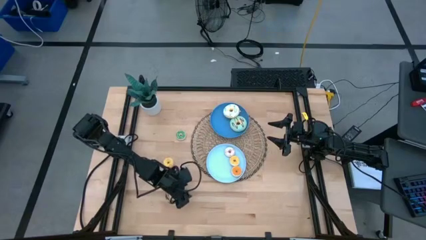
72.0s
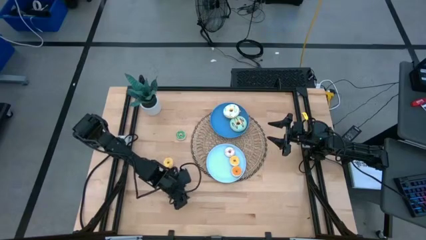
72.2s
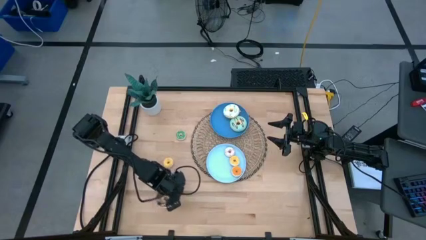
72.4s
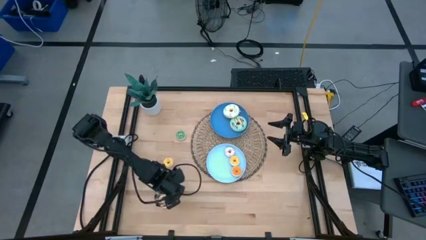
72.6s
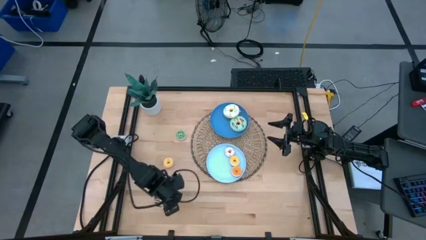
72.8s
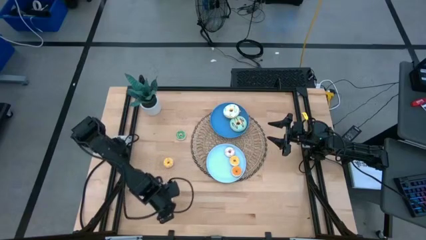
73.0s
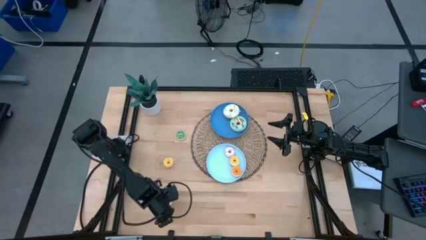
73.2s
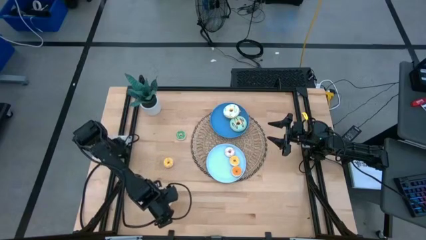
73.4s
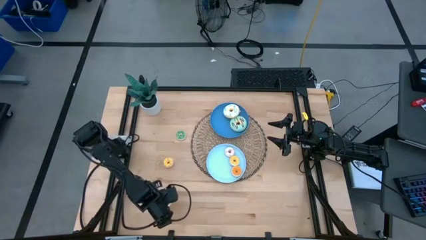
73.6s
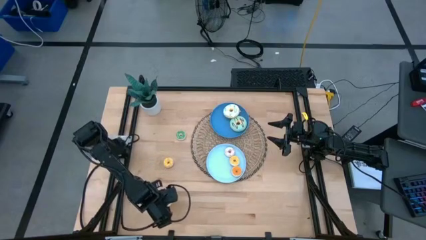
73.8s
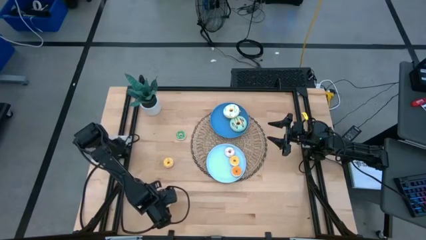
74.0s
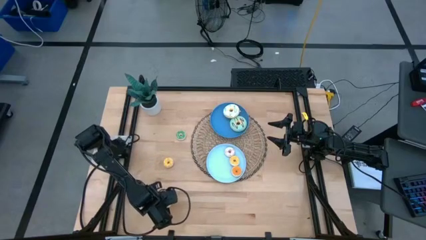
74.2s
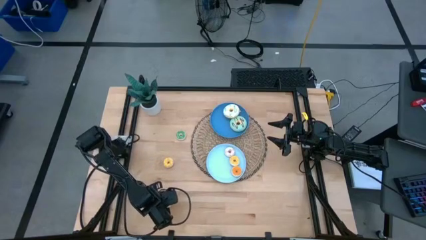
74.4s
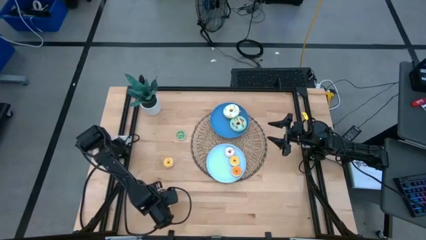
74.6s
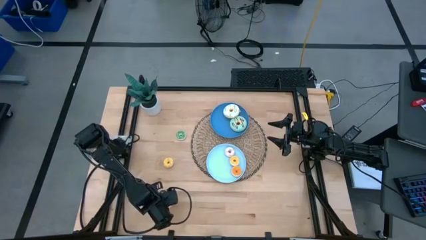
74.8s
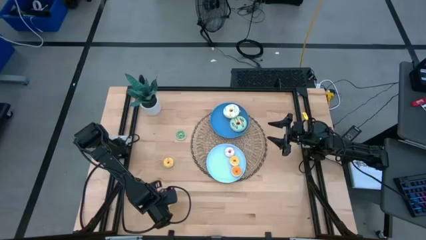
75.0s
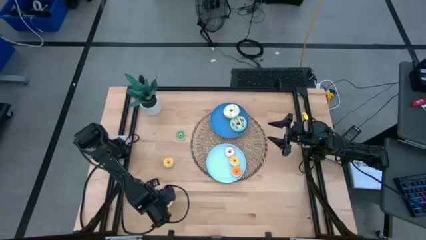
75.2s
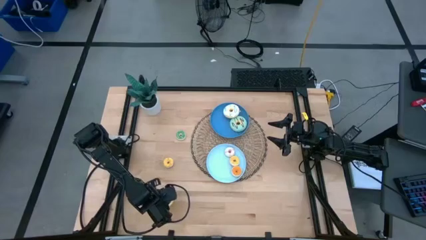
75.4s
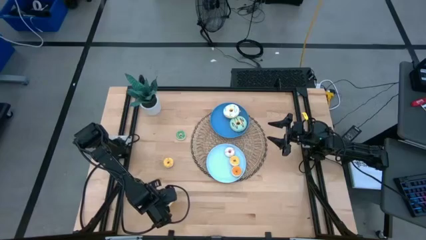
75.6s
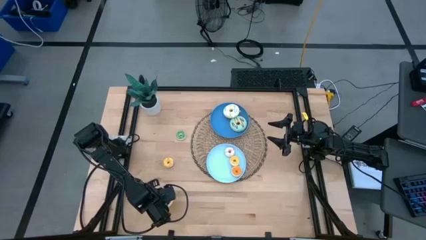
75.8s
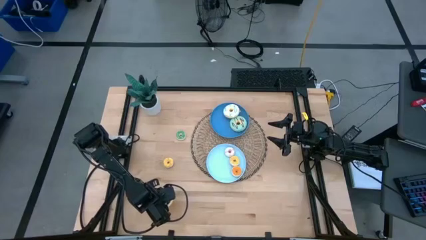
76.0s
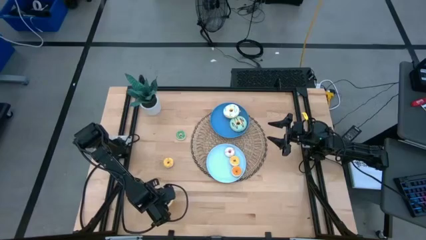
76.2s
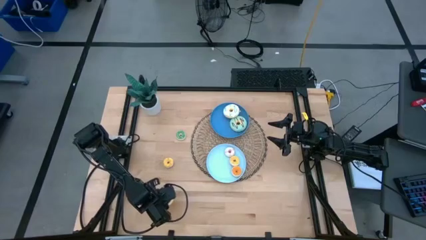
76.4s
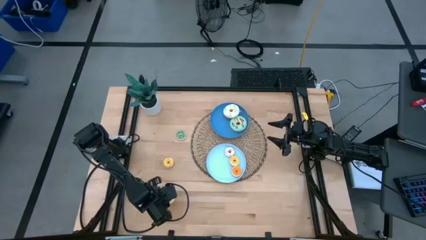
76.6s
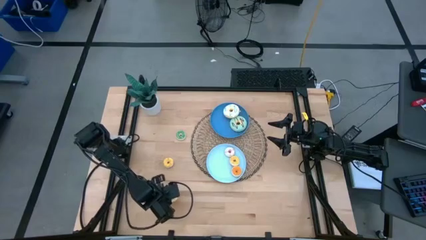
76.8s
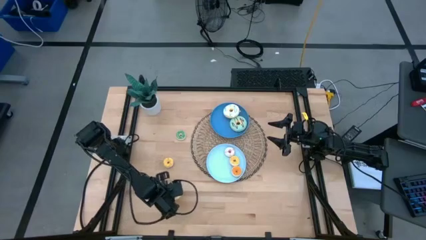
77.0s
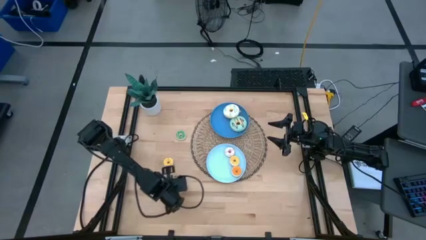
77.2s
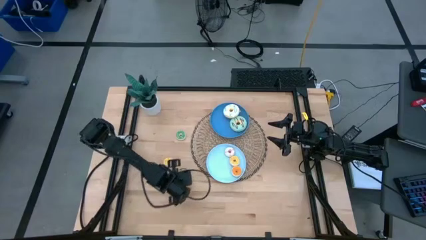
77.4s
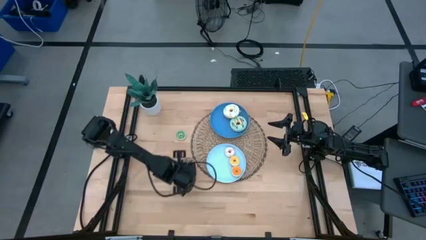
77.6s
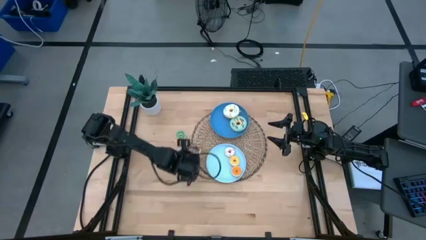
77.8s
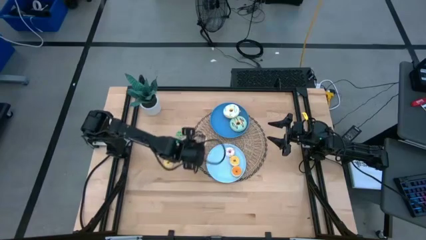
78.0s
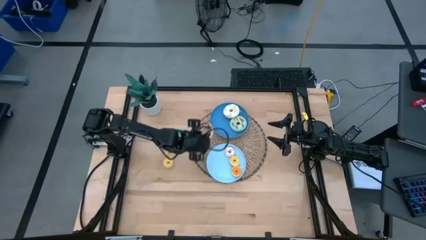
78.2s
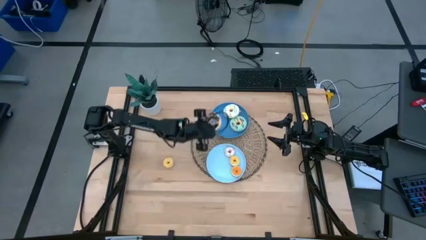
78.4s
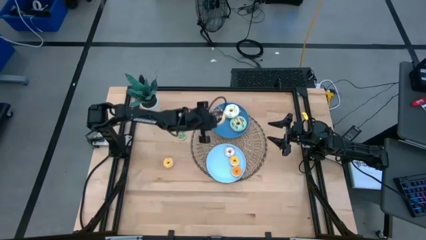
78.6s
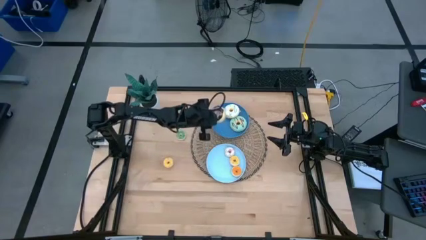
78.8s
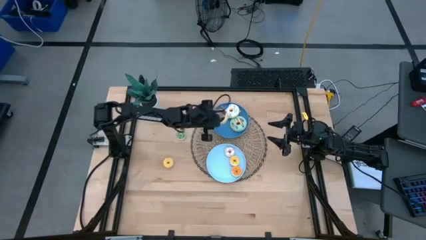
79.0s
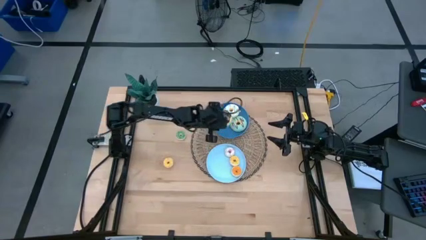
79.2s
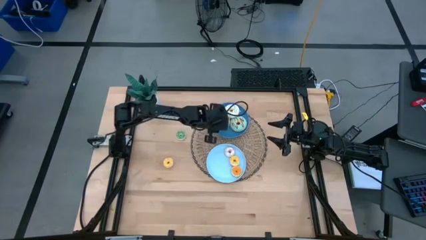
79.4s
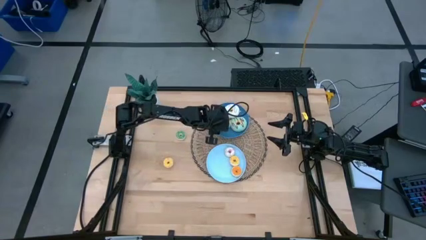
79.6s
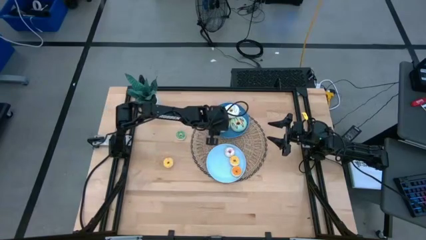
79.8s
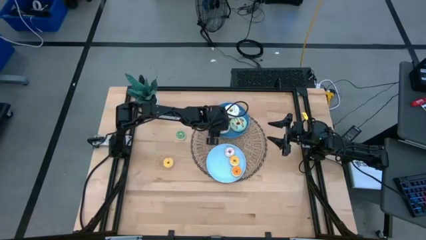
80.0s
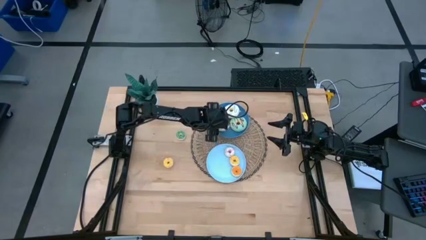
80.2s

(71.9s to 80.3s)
Task: Pick & Place donuts
Put the black donut on the blue plate

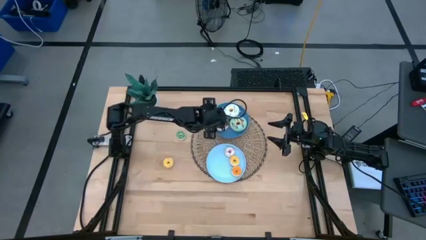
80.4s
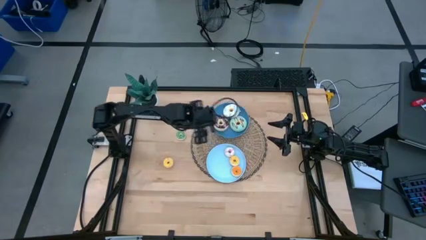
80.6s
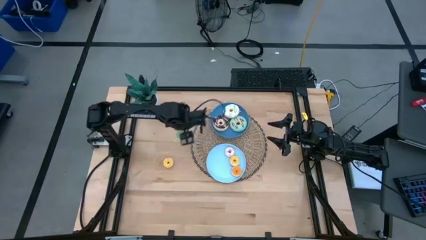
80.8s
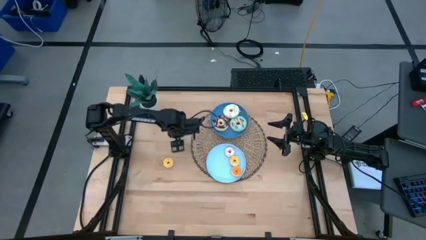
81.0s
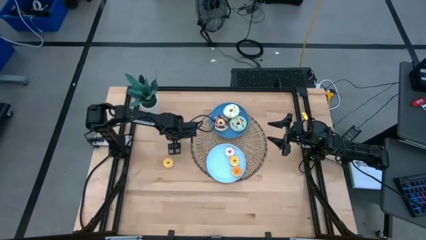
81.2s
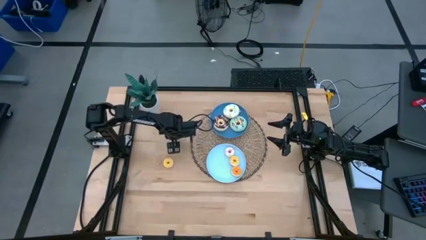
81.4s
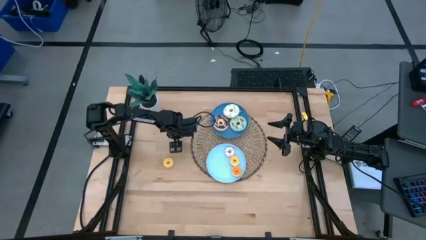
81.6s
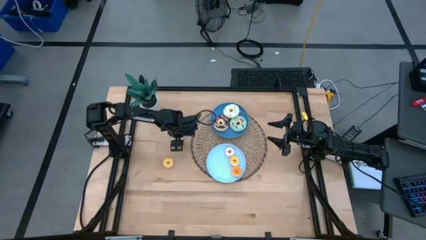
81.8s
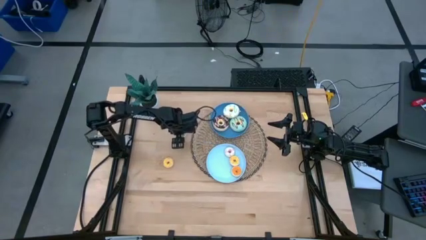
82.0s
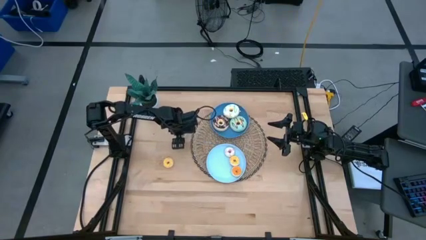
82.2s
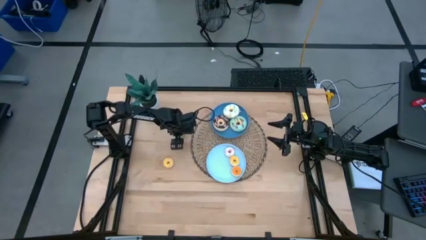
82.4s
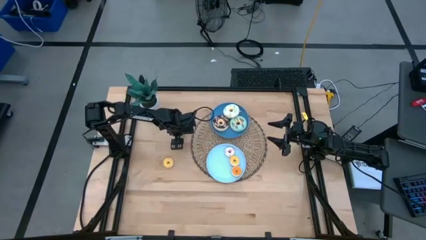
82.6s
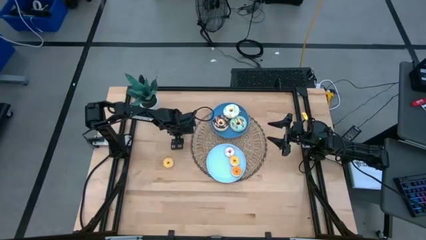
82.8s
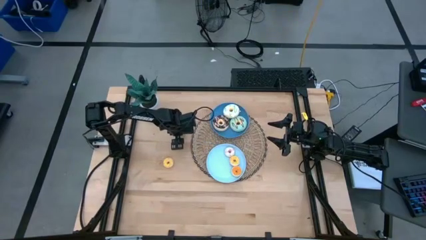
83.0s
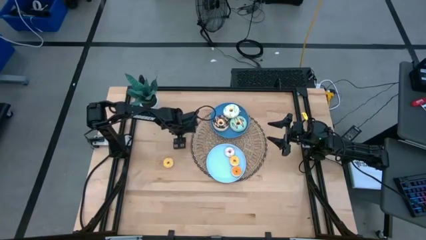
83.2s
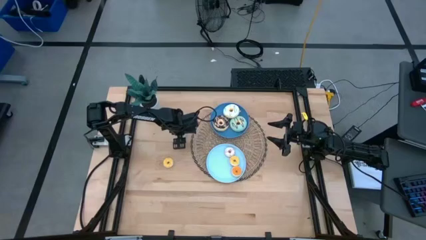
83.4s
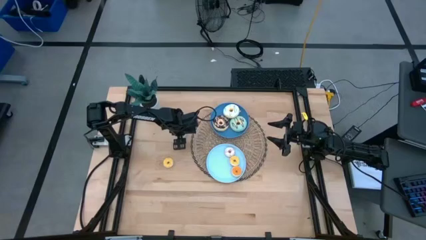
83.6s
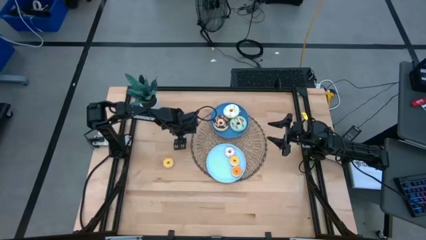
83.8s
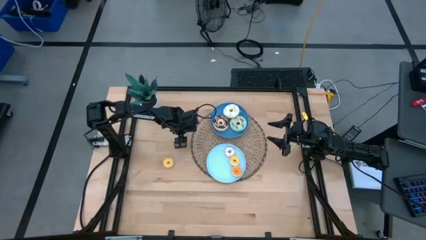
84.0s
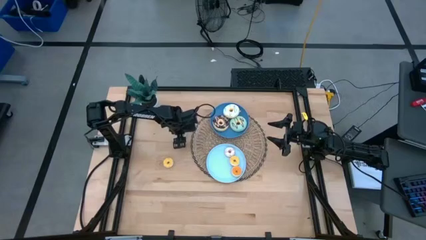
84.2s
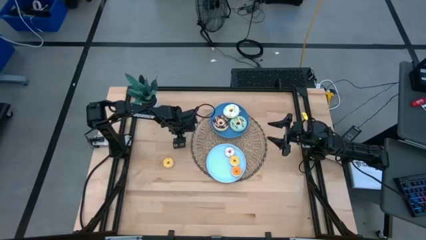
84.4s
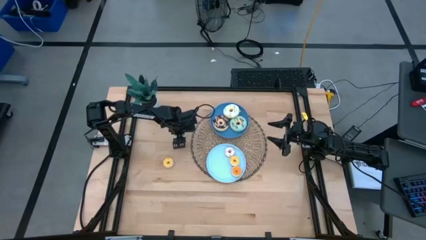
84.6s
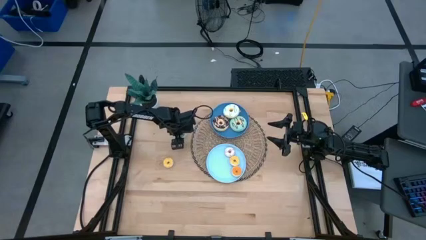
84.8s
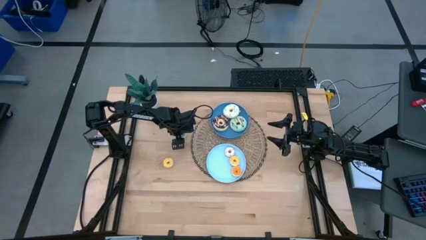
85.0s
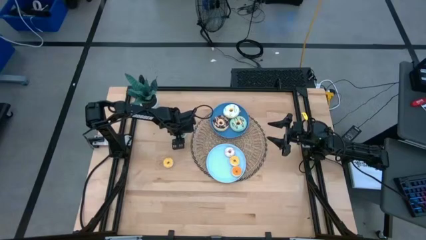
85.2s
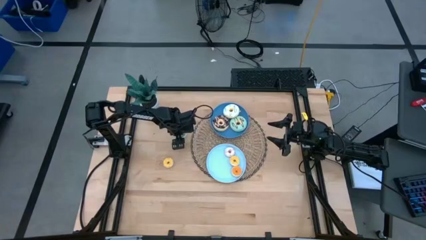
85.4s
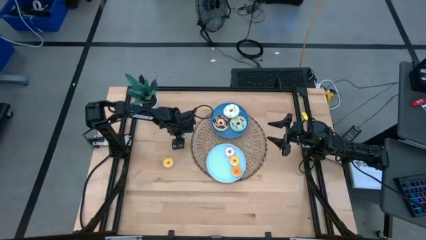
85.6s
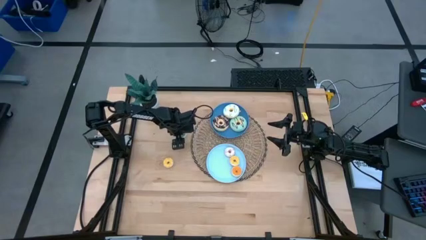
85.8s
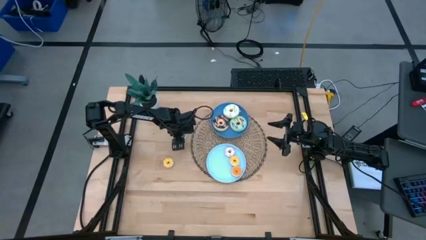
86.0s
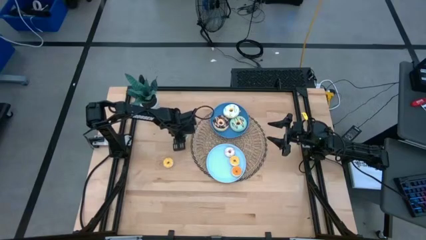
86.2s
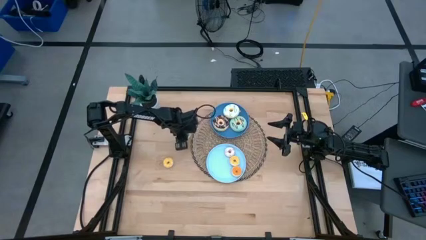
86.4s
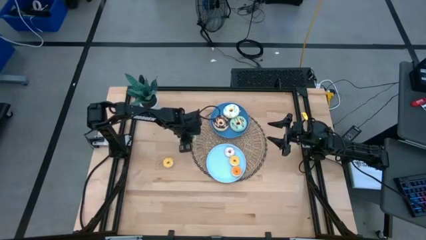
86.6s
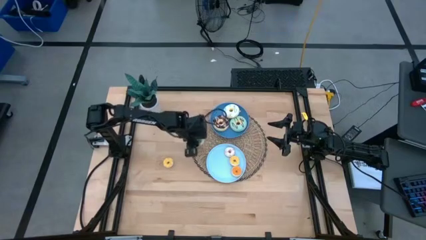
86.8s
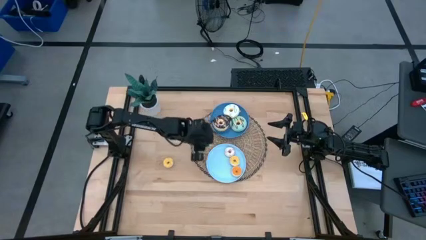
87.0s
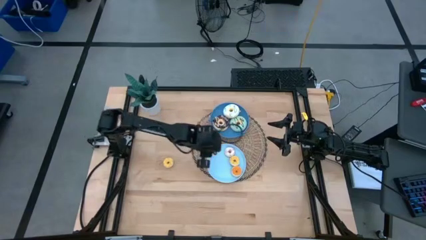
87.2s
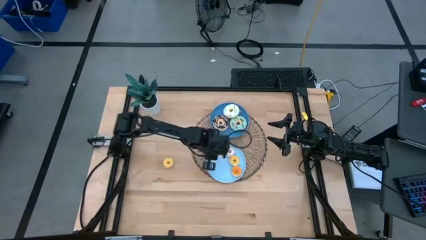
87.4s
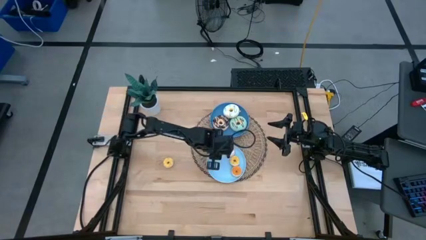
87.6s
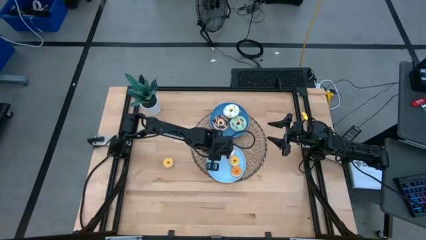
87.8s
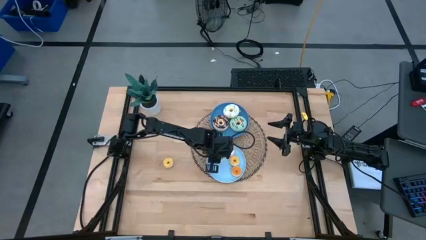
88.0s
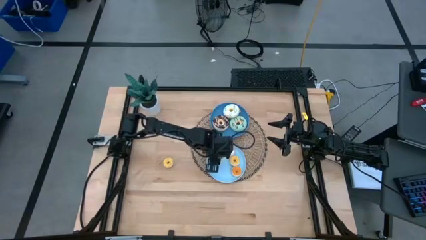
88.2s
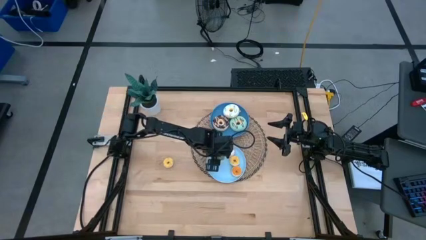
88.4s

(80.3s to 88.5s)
Put the small green donut on the light blue plate
